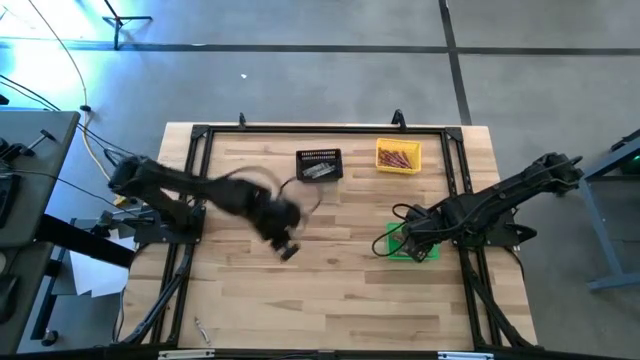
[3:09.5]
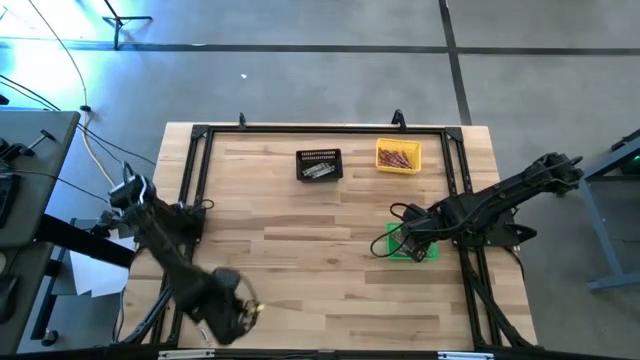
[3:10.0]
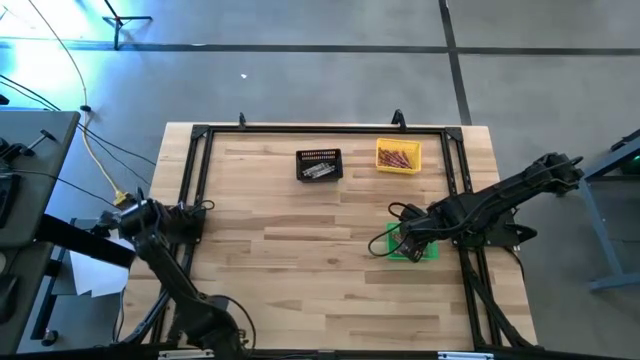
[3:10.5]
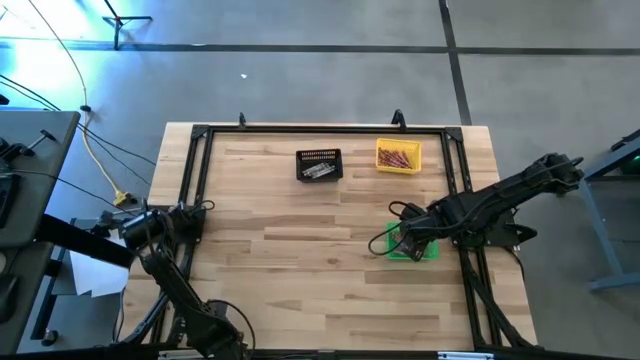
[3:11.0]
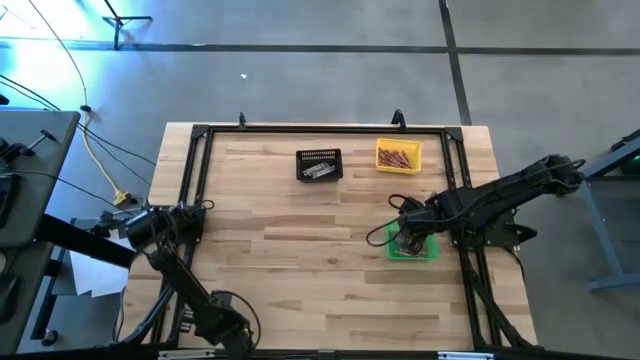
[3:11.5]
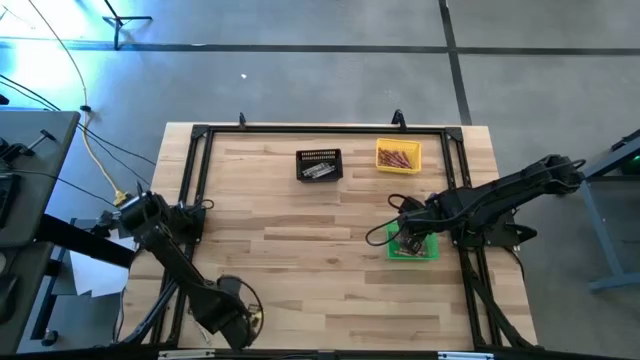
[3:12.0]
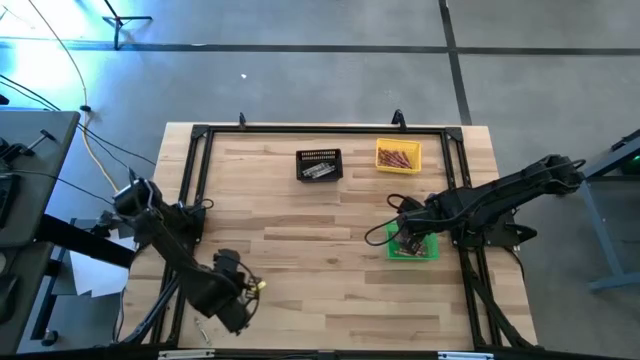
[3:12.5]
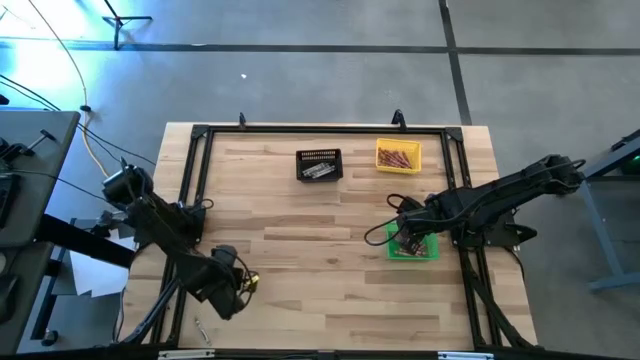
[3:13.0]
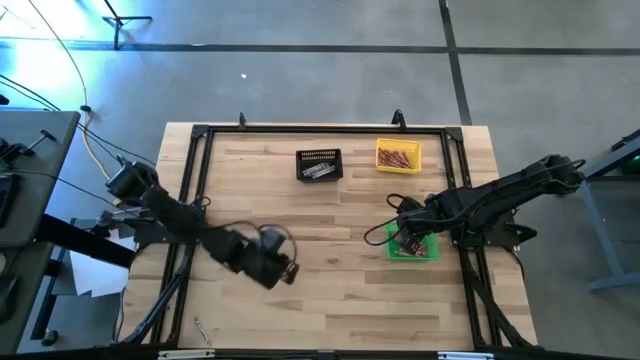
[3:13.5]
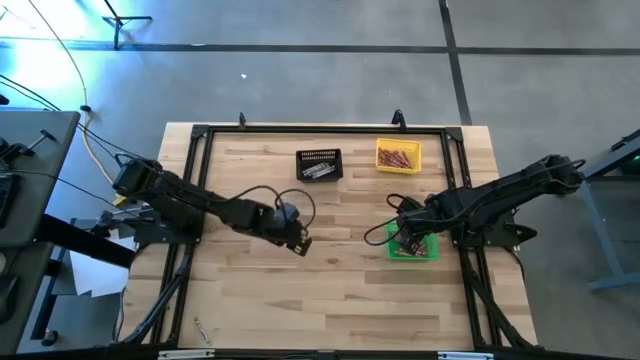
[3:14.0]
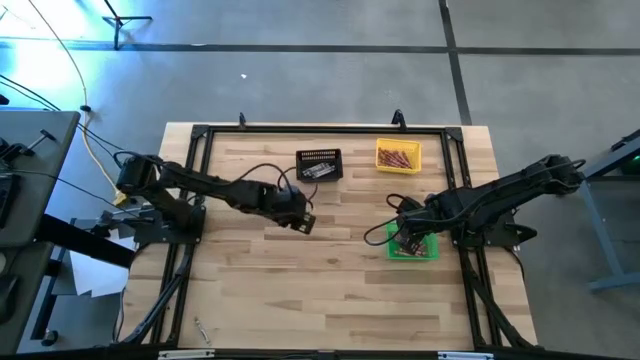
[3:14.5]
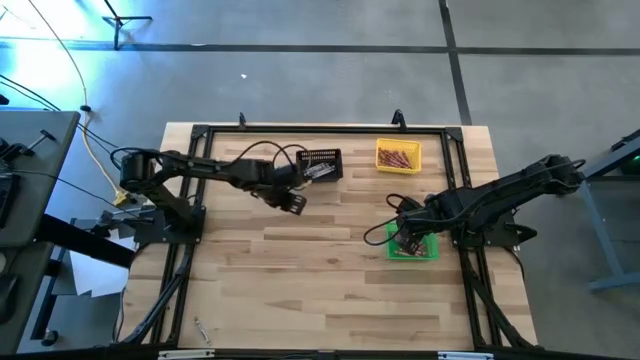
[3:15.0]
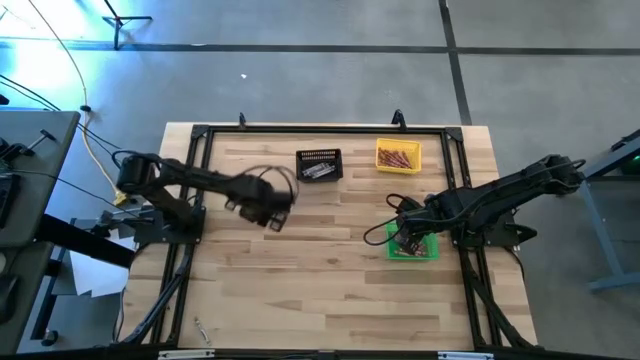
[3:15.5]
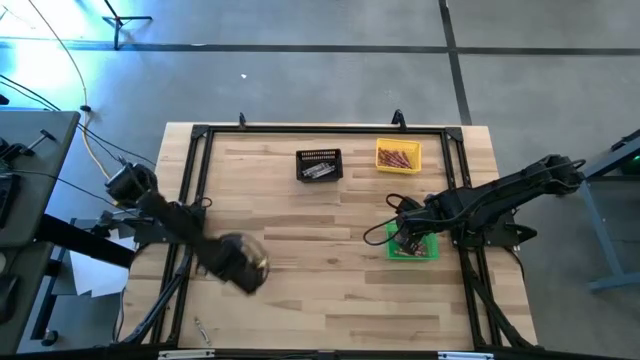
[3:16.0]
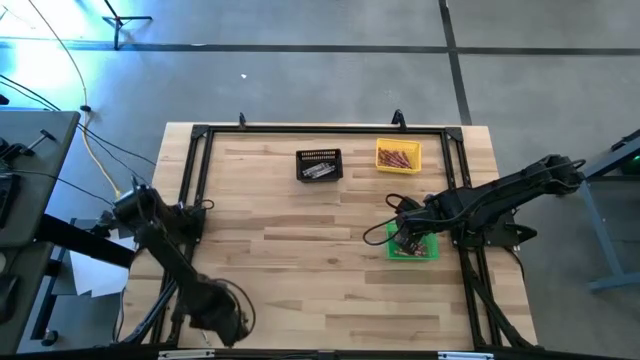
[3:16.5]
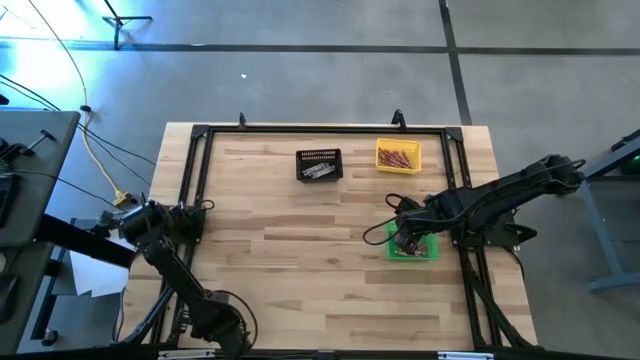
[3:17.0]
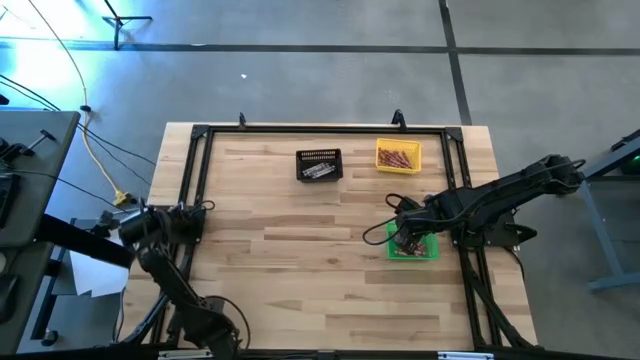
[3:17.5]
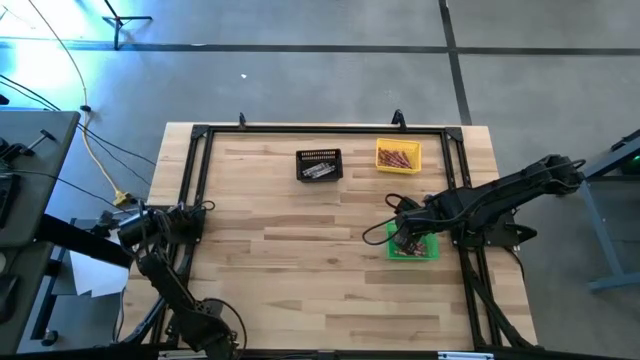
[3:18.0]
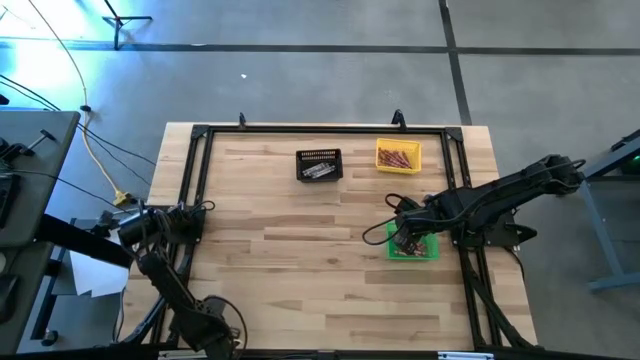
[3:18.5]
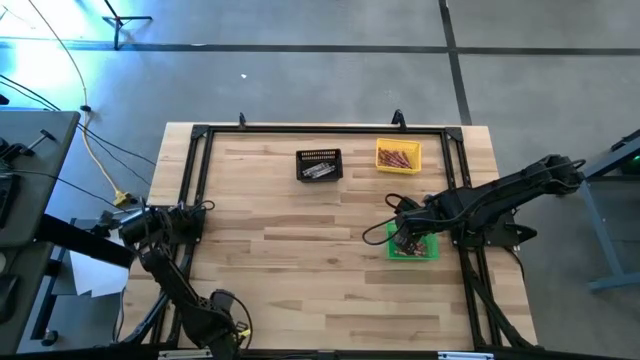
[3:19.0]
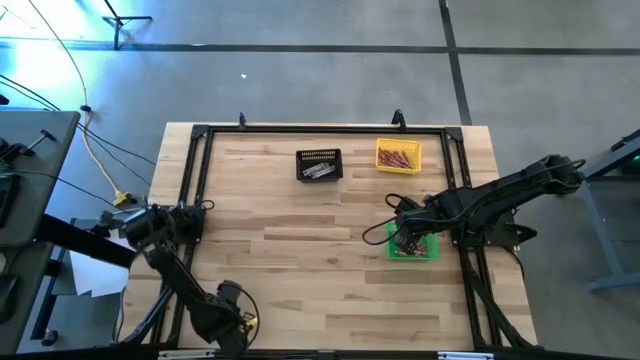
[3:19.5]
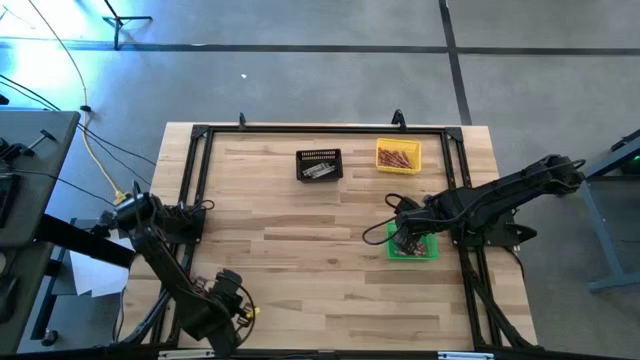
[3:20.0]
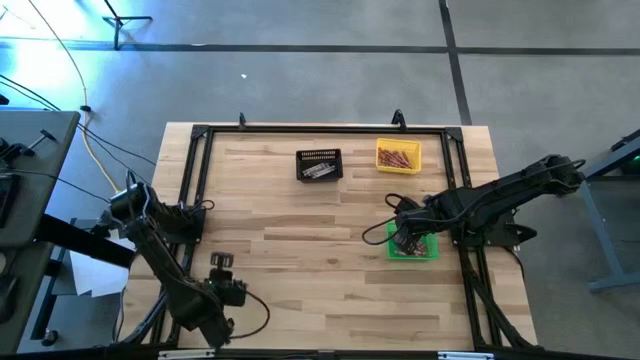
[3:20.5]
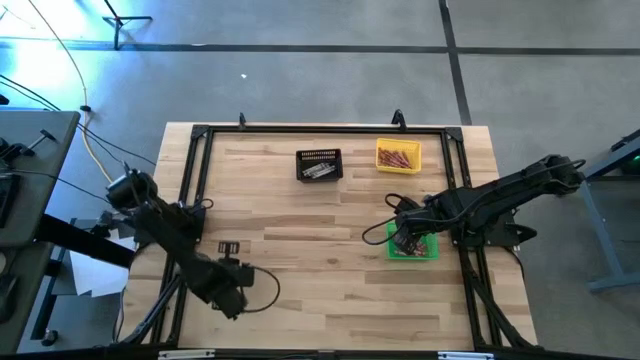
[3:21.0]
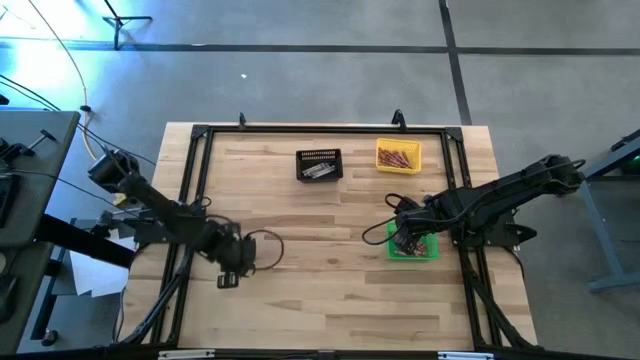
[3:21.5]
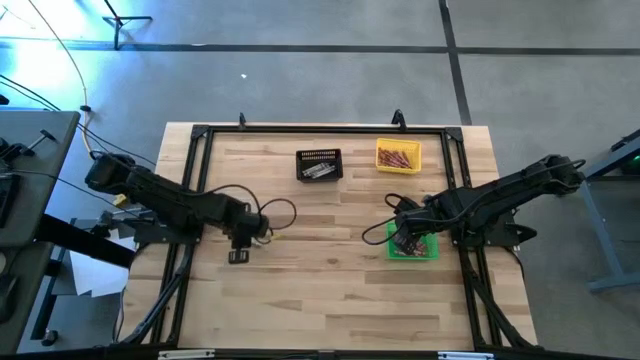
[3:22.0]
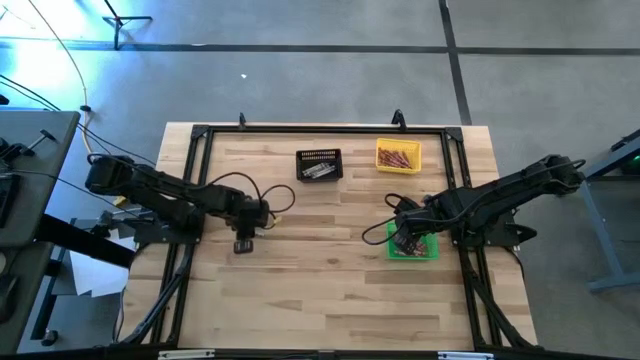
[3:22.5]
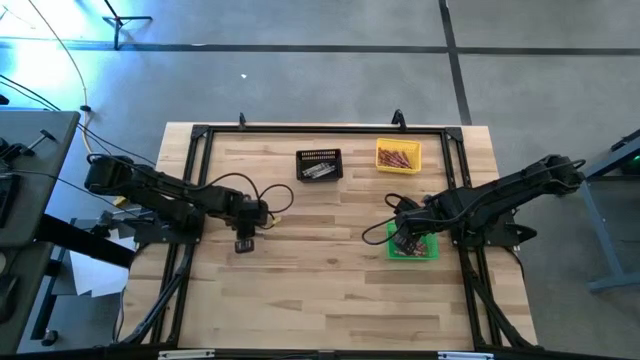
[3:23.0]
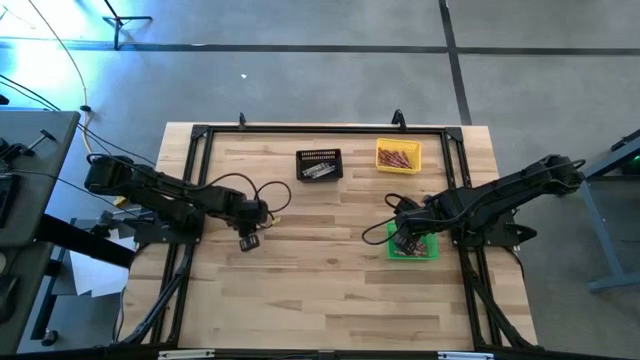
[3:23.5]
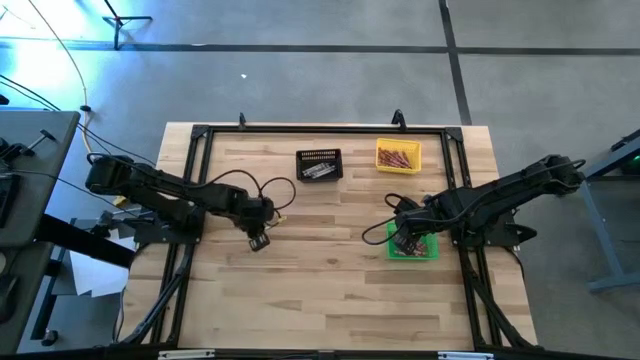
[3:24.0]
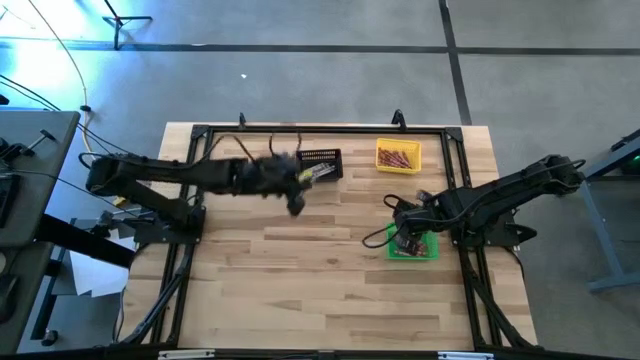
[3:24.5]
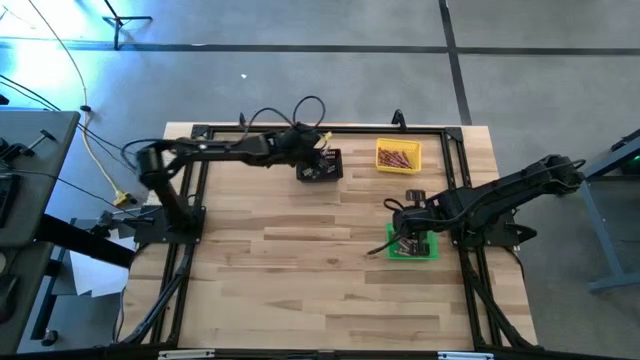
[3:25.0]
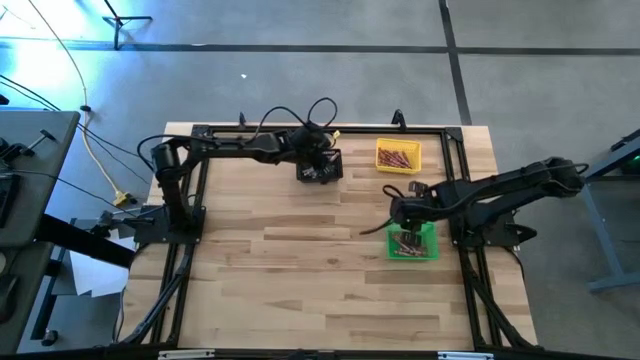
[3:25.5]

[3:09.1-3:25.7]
Task: Sort crayons
Put the gray crayon into the black basket

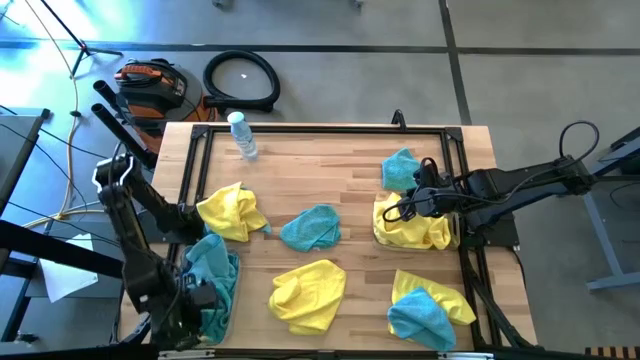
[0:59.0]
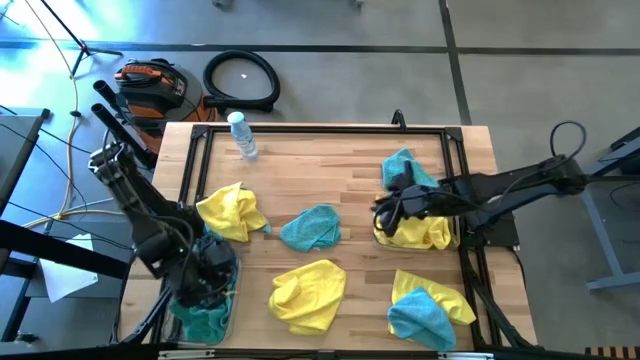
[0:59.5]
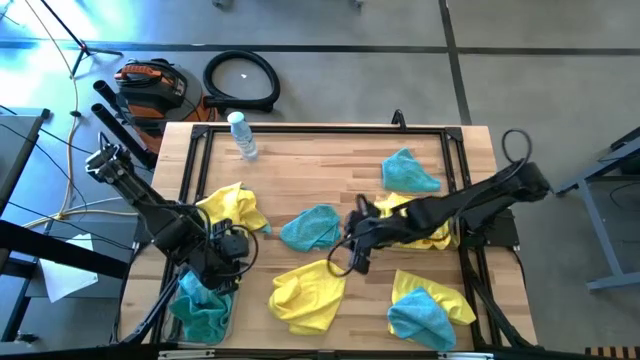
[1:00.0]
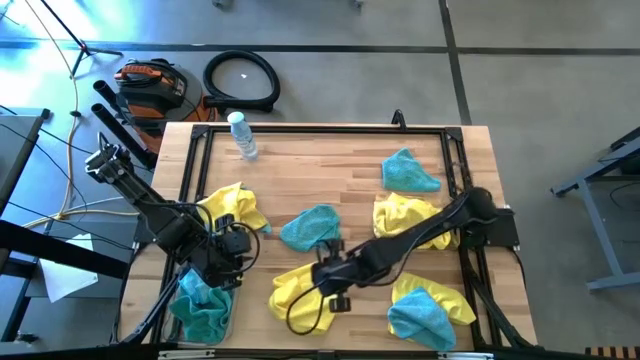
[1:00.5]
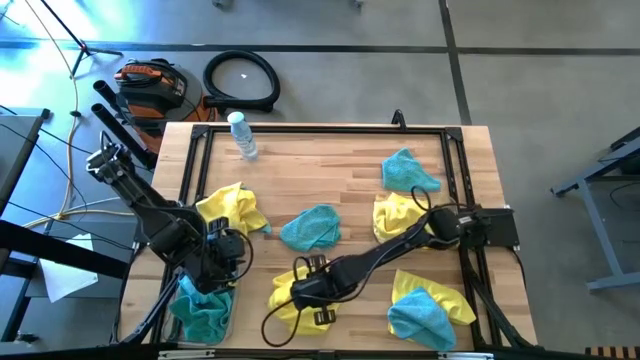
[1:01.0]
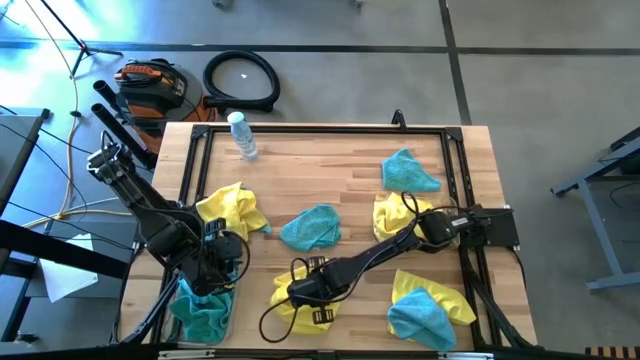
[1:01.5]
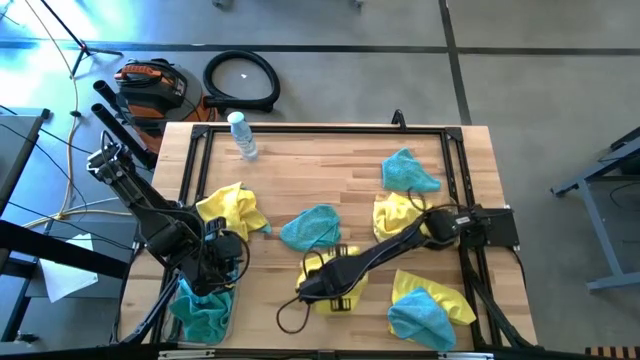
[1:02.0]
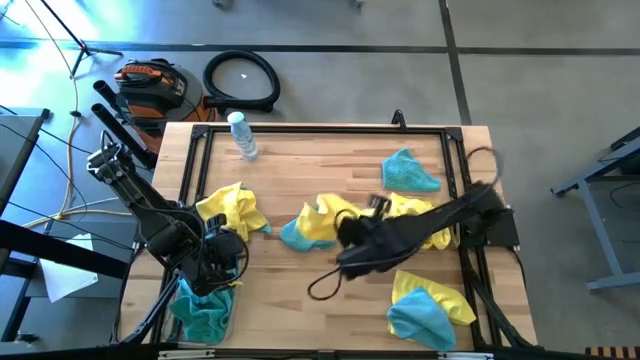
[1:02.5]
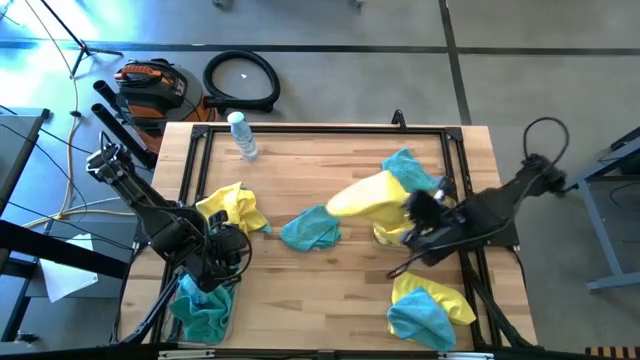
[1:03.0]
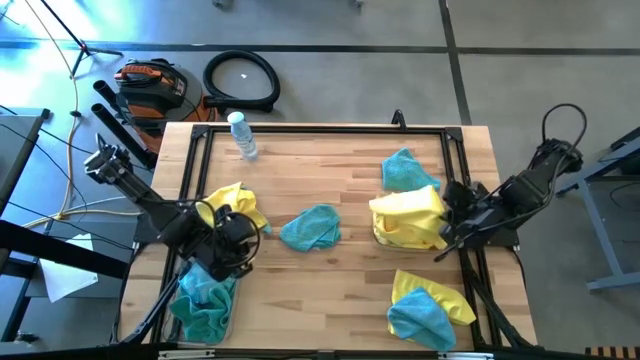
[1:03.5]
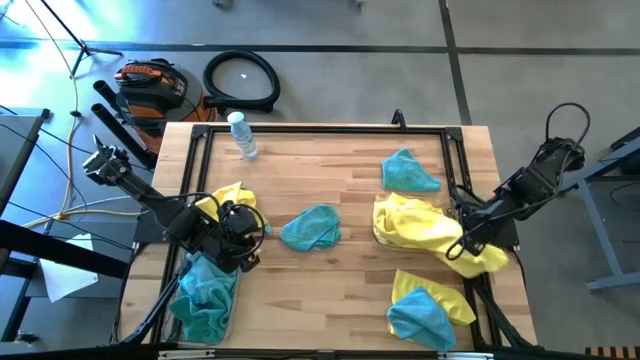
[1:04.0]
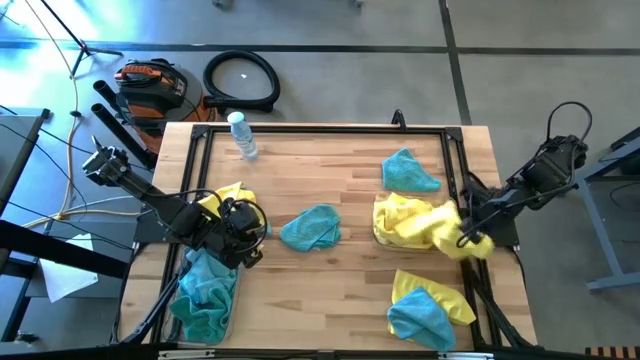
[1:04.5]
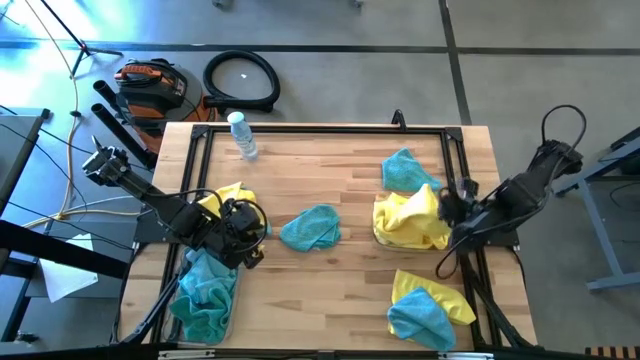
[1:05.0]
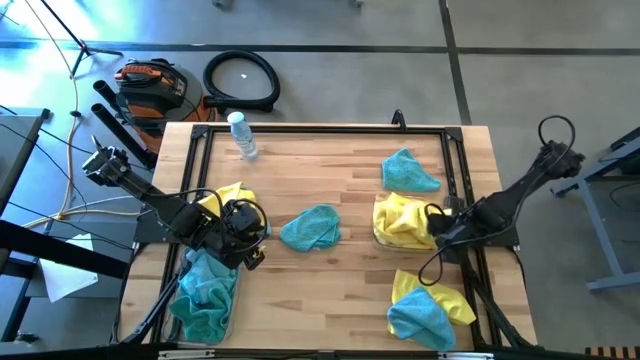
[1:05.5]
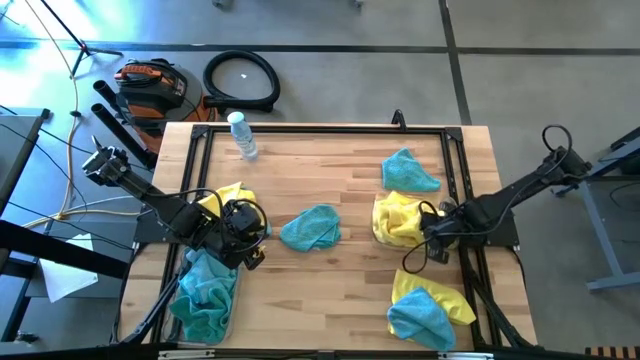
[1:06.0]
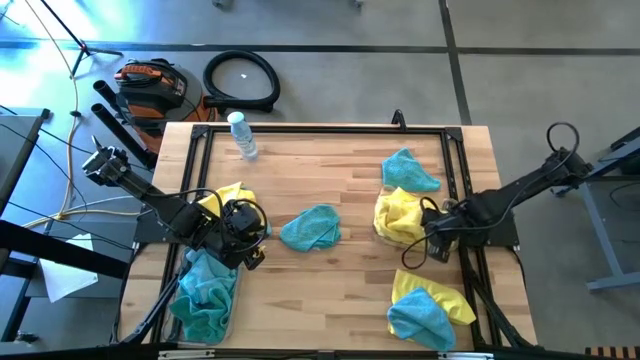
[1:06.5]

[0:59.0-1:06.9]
Task: Sort microfiber towel by color & place in baskets
Put the yellow microfiber towel into the right transparent bin
